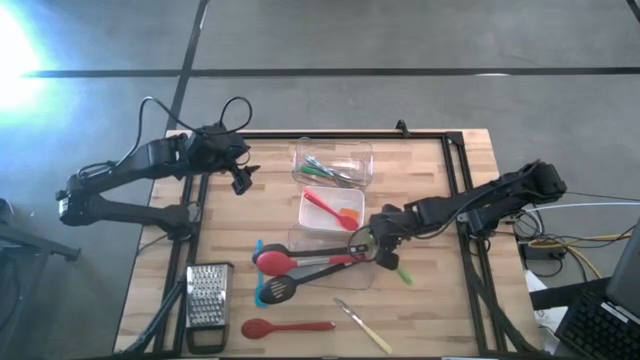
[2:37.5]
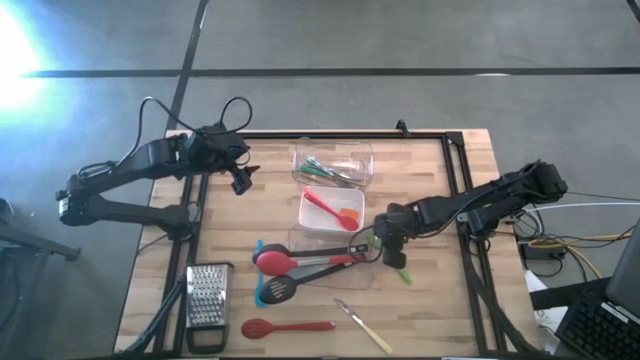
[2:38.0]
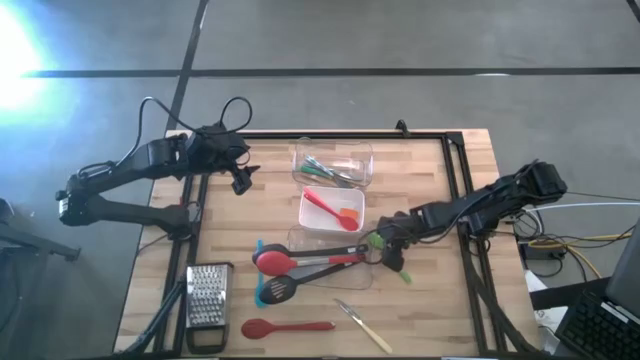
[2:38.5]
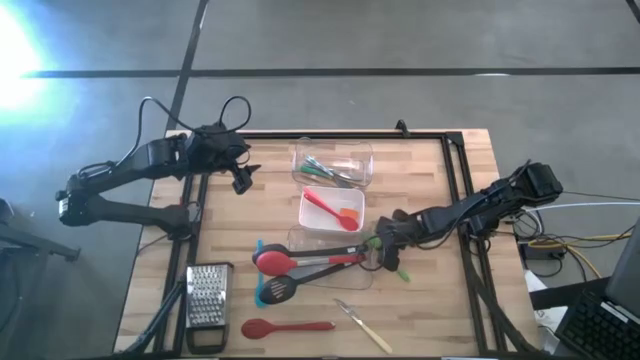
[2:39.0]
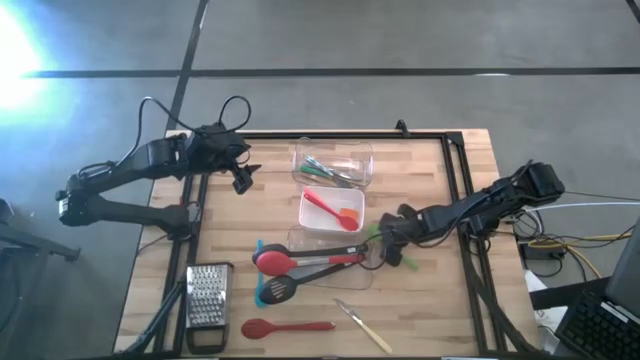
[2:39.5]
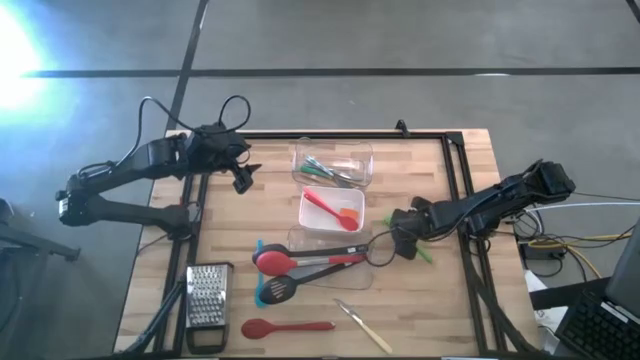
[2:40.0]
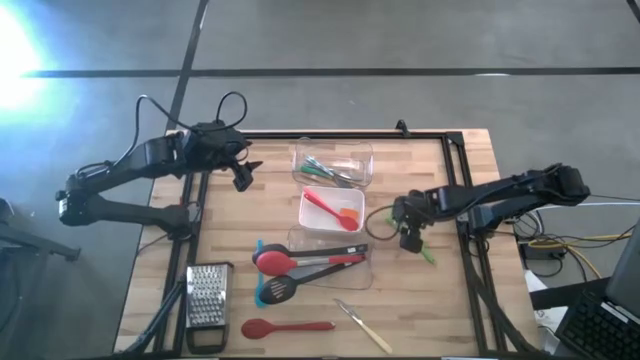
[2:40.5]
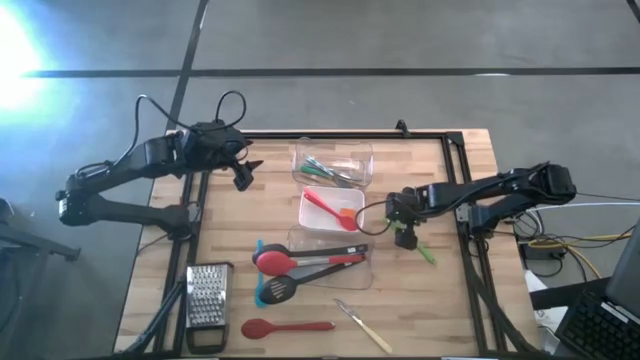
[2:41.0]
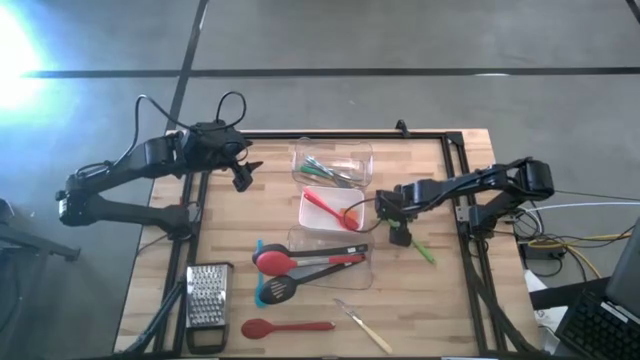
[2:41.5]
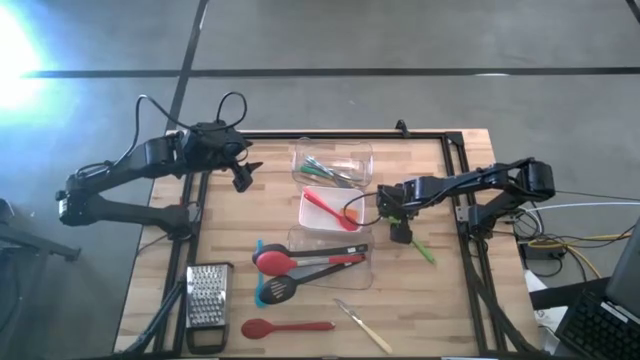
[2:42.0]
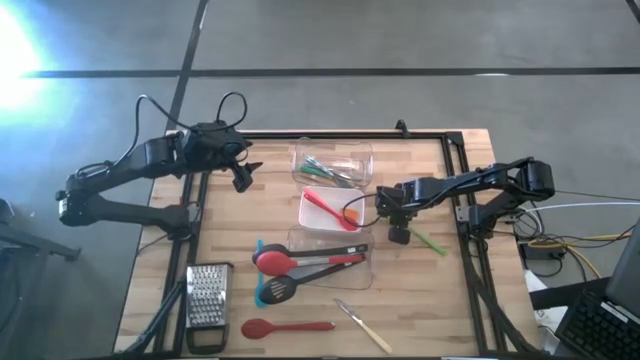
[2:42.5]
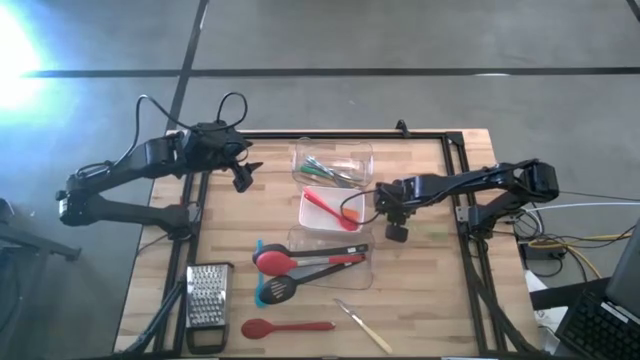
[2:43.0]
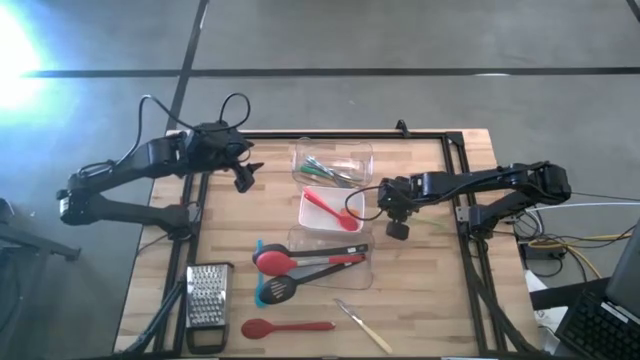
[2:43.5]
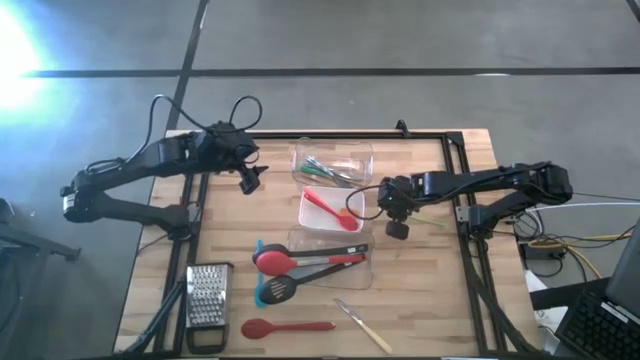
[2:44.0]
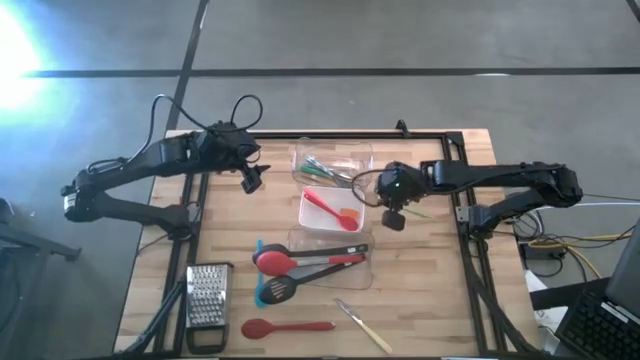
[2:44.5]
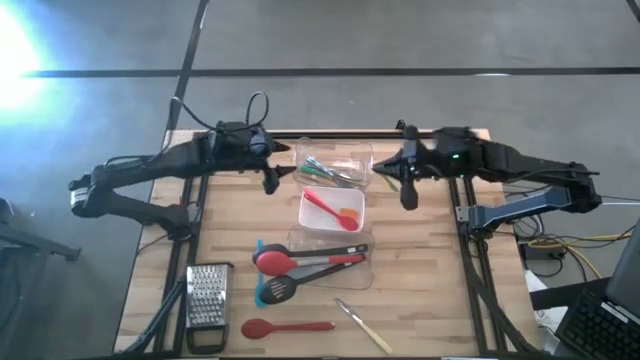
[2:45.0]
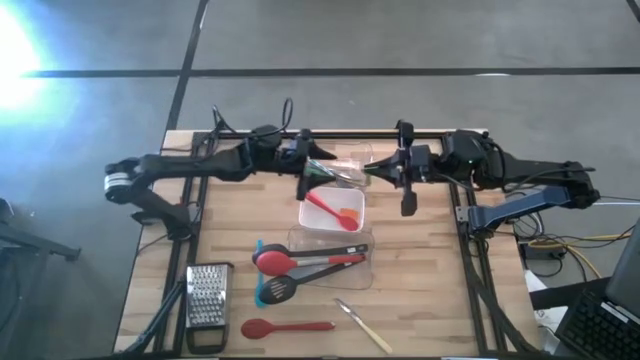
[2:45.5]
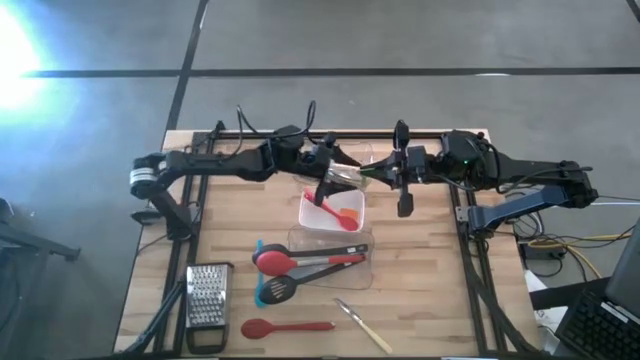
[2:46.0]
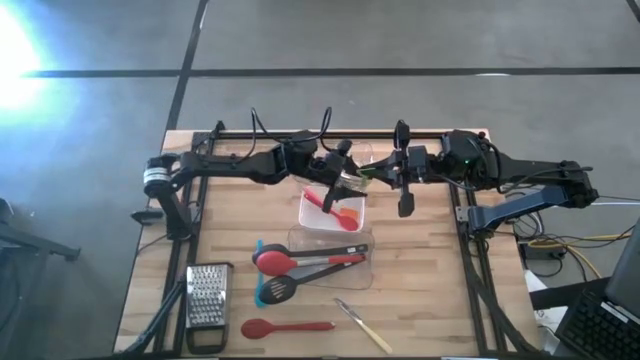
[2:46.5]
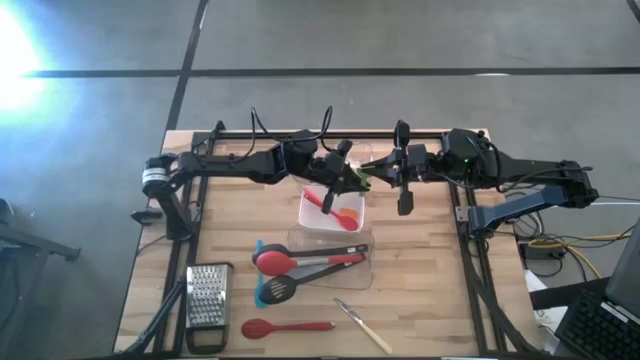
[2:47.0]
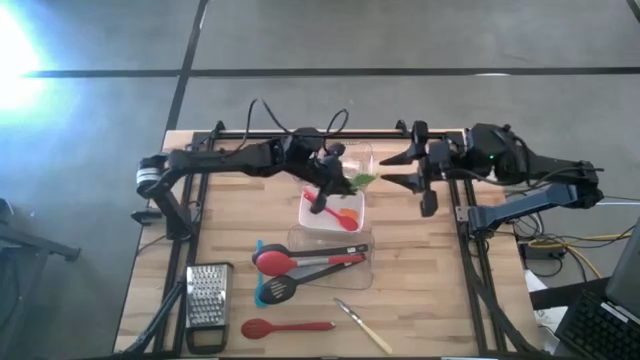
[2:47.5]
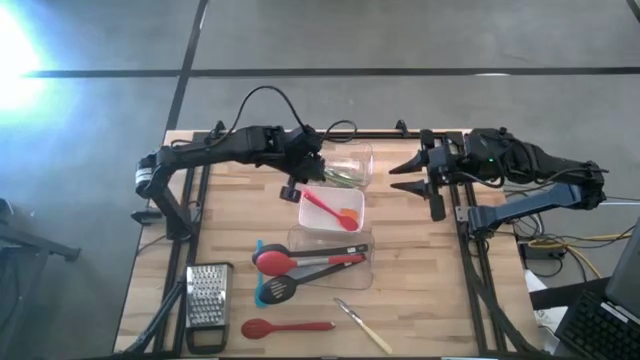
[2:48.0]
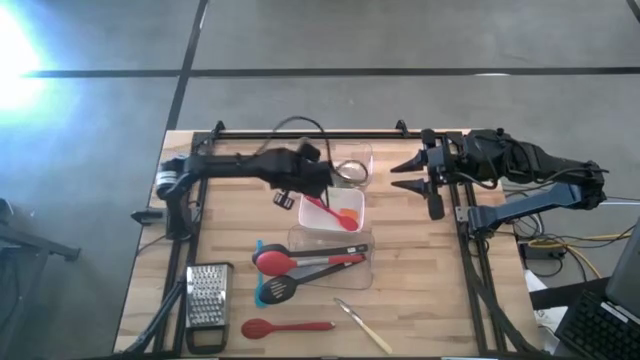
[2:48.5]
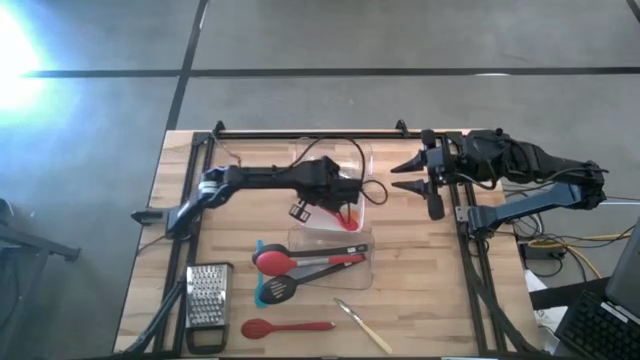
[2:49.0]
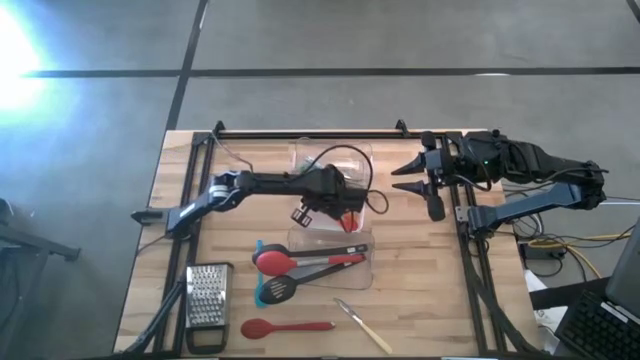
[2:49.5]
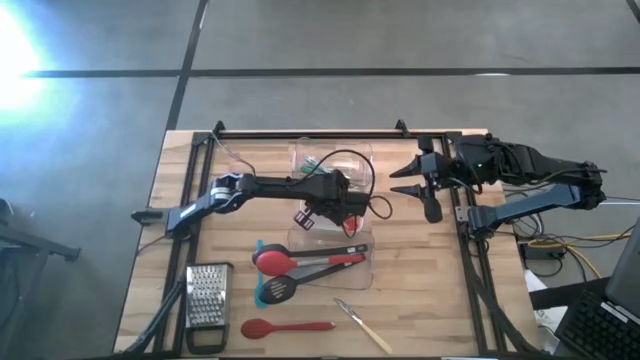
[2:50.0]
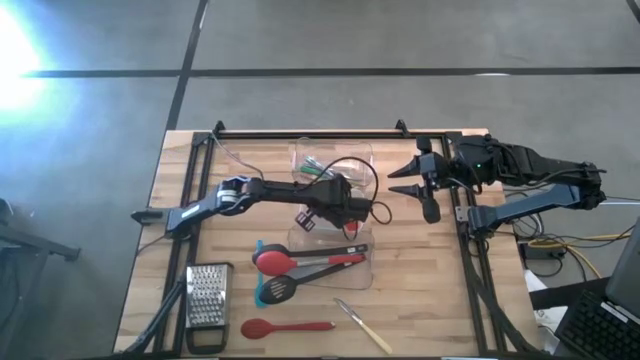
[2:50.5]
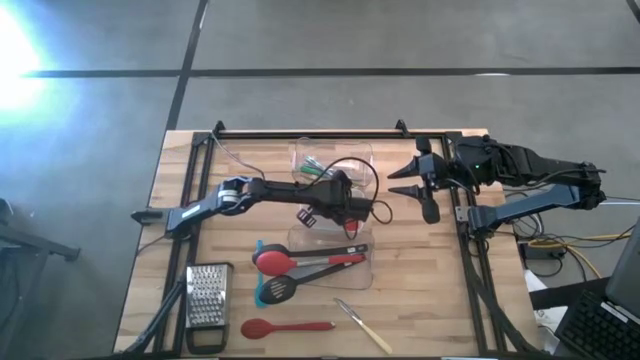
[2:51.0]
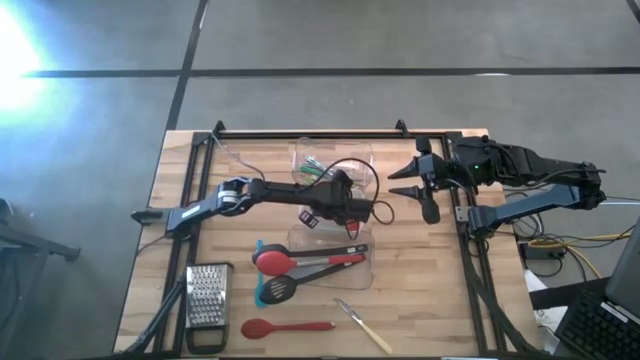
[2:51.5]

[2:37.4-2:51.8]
Task: Pick & Place Kitchen Items
Put the green spatula into the white bin

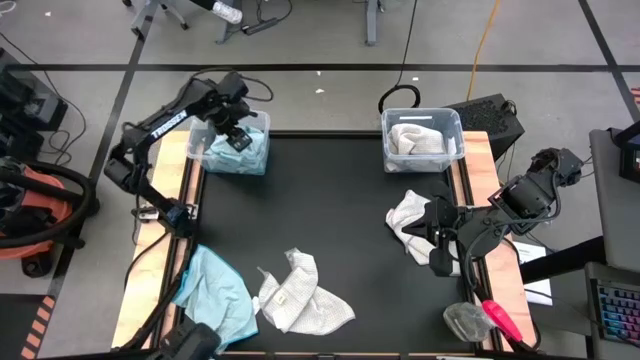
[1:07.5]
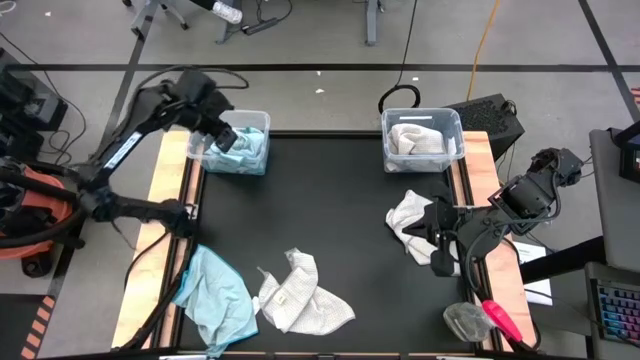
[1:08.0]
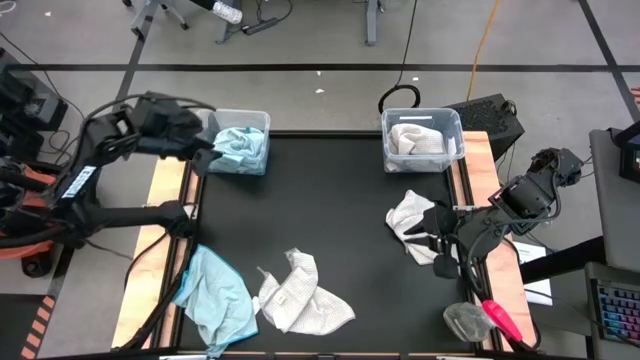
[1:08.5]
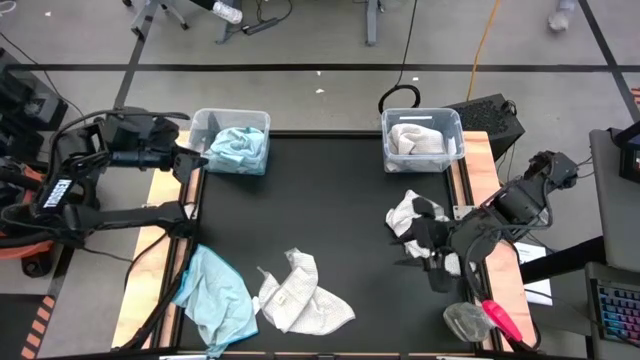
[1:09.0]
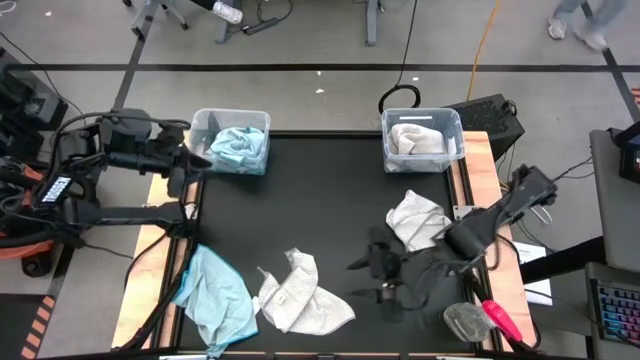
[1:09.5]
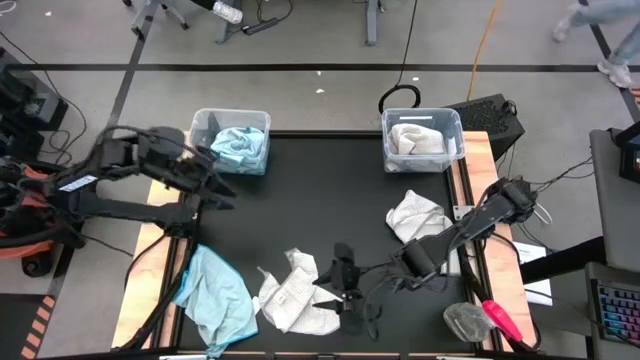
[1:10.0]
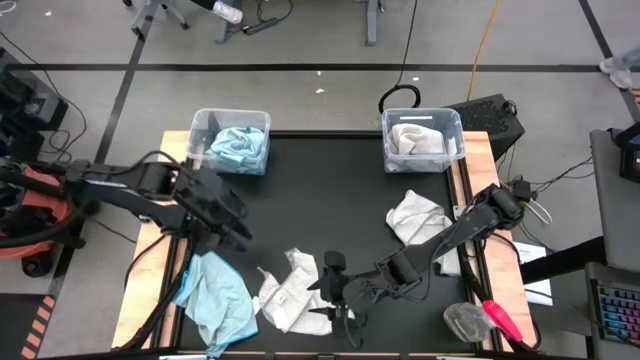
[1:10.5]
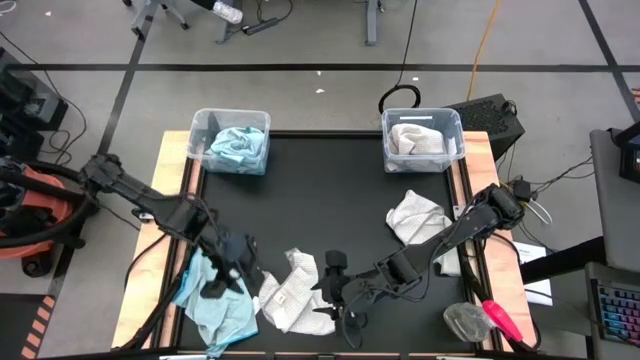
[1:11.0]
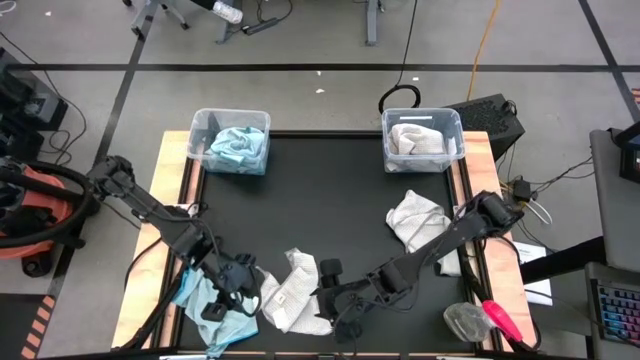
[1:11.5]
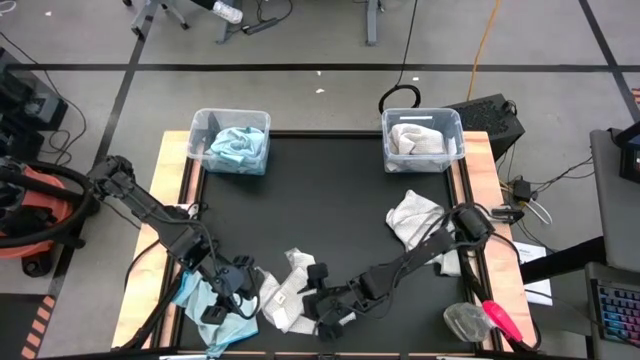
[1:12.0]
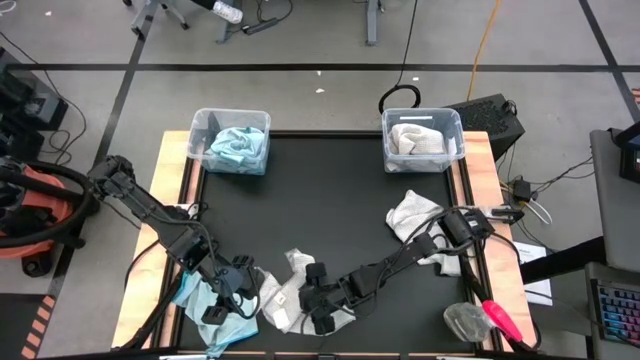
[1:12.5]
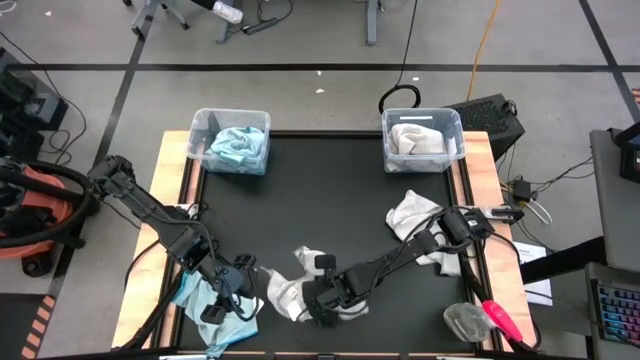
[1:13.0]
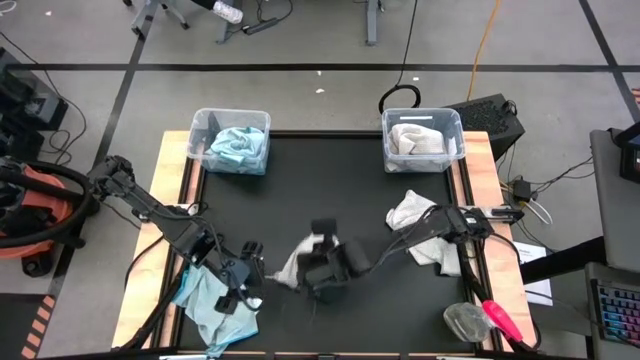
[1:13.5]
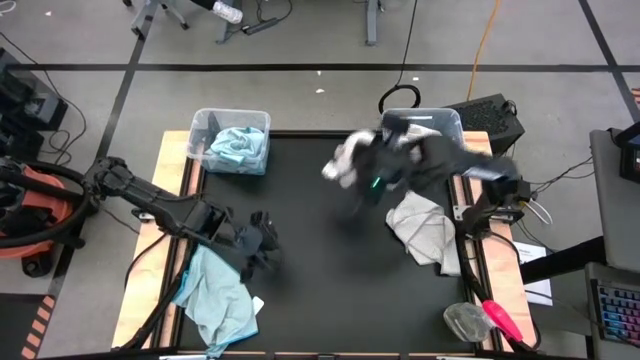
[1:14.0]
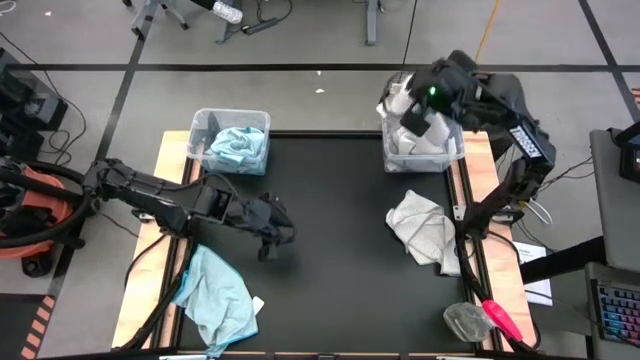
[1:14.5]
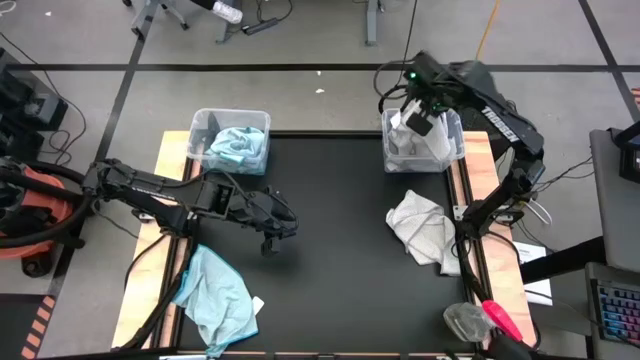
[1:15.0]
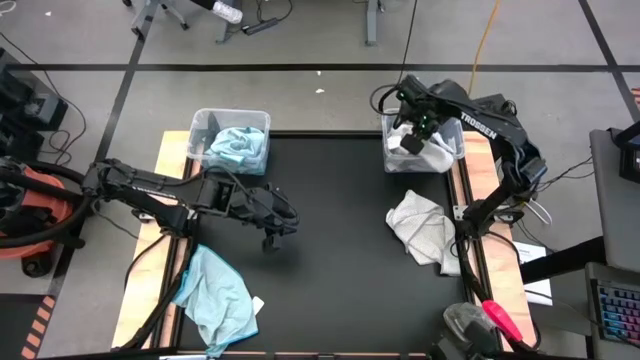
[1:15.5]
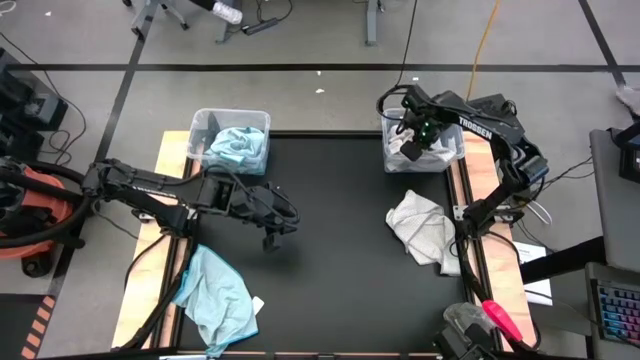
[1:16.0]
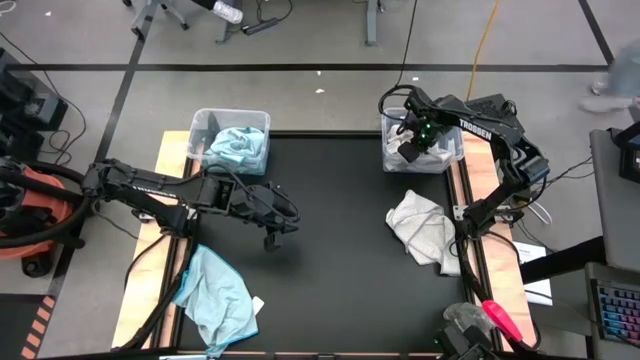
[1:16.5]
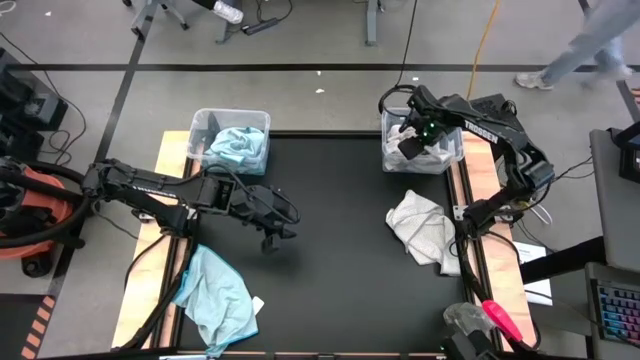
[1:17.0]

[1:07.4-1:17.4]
Task: Sort microfiber towel by color & place in baskets
Put the gray towel into the right transparent bin
